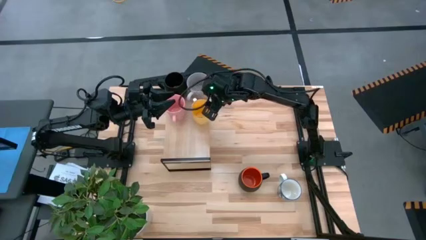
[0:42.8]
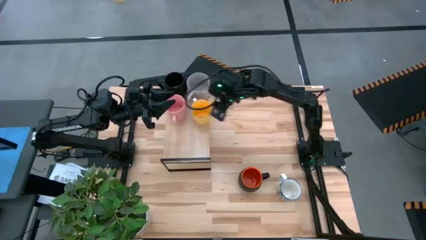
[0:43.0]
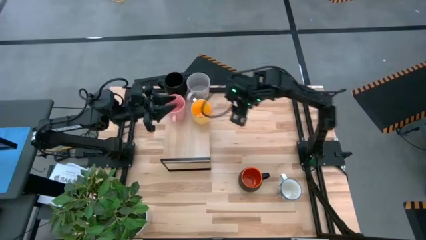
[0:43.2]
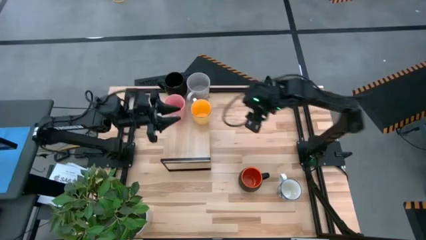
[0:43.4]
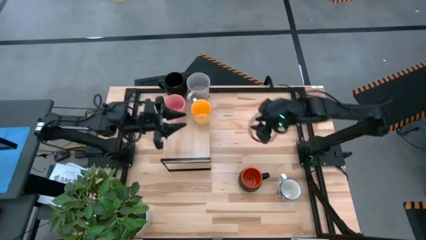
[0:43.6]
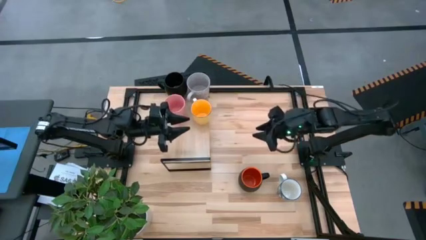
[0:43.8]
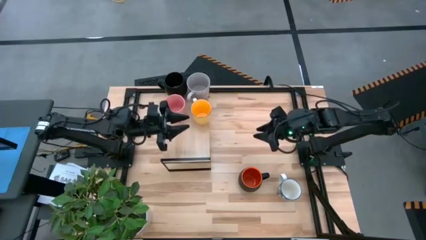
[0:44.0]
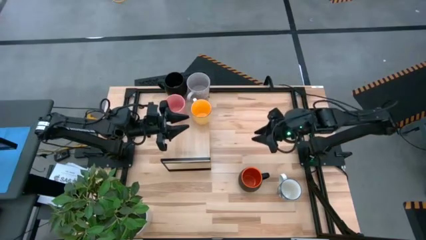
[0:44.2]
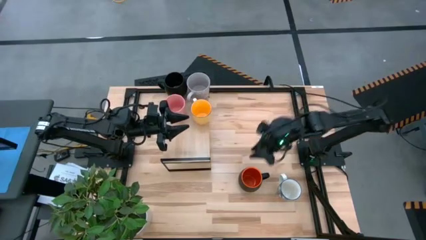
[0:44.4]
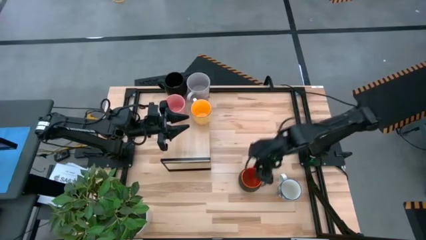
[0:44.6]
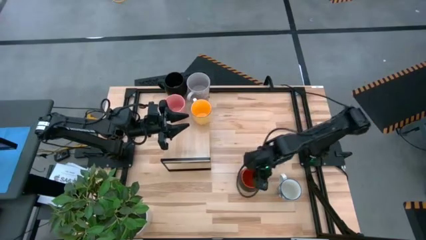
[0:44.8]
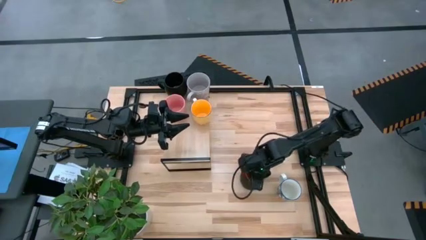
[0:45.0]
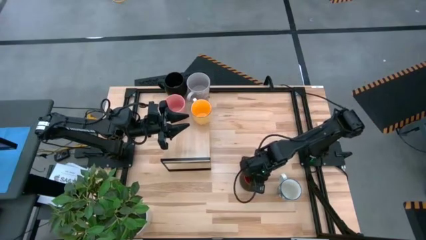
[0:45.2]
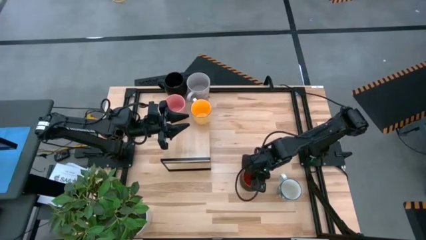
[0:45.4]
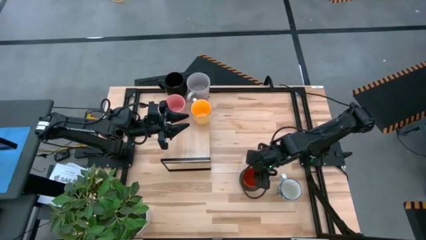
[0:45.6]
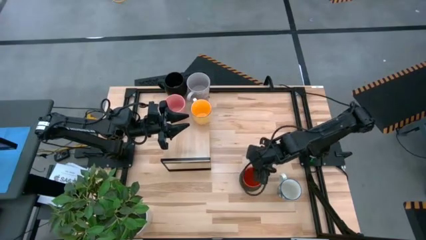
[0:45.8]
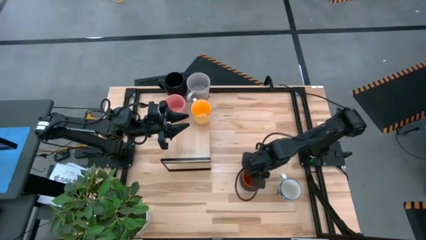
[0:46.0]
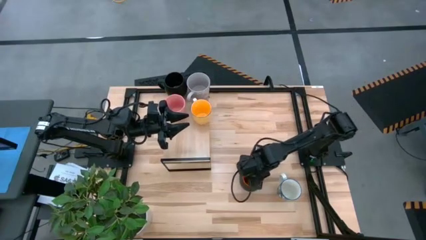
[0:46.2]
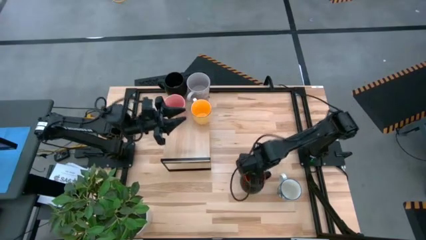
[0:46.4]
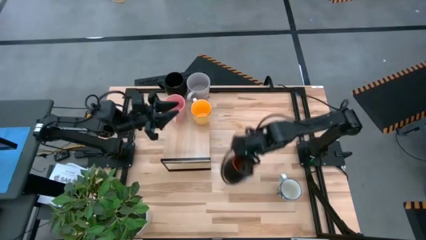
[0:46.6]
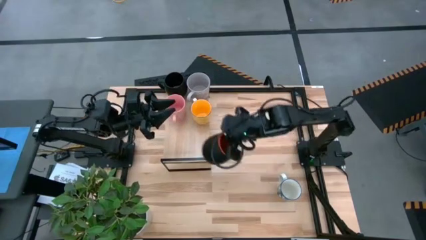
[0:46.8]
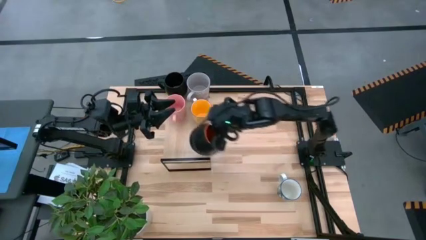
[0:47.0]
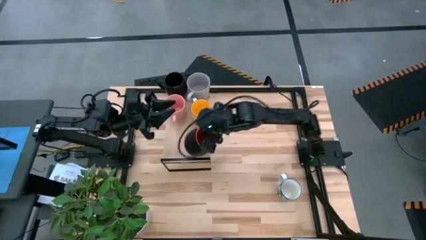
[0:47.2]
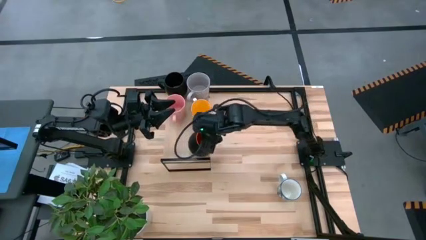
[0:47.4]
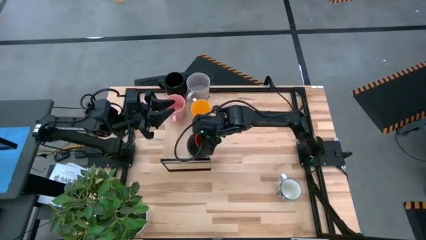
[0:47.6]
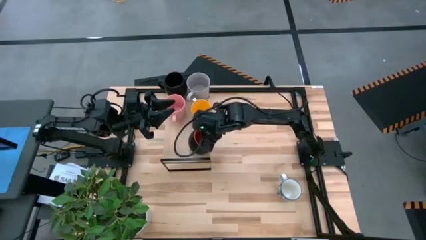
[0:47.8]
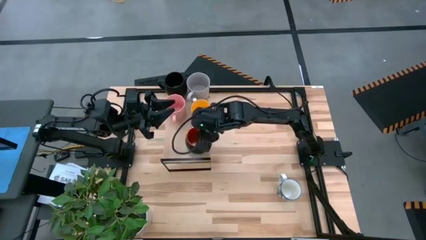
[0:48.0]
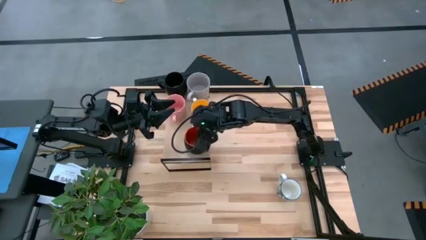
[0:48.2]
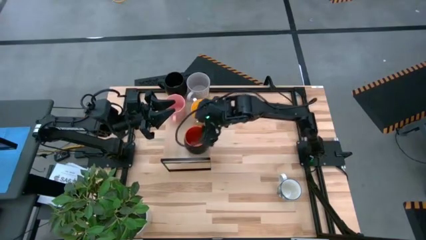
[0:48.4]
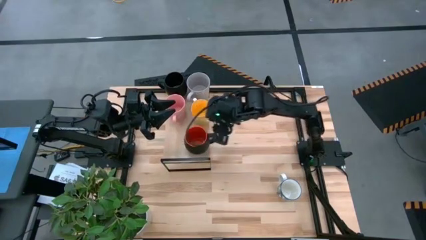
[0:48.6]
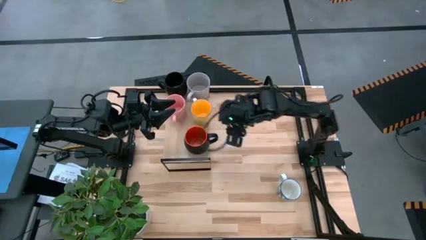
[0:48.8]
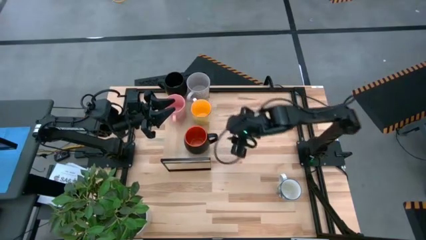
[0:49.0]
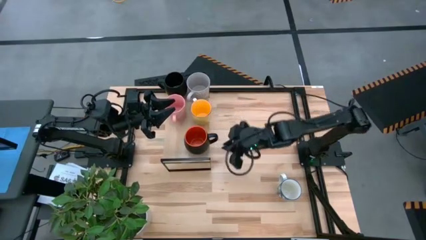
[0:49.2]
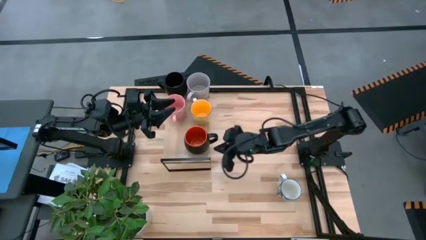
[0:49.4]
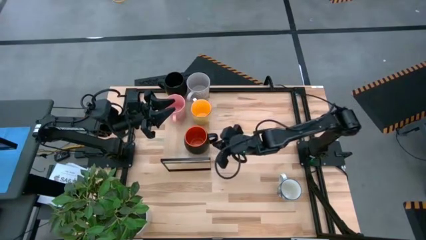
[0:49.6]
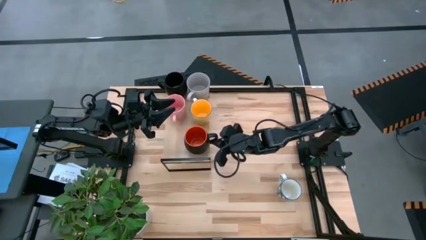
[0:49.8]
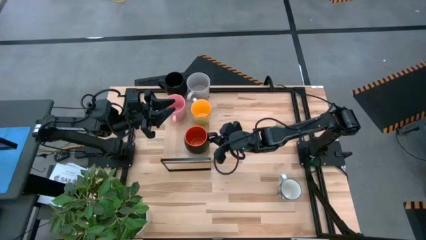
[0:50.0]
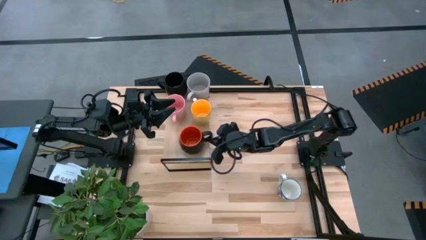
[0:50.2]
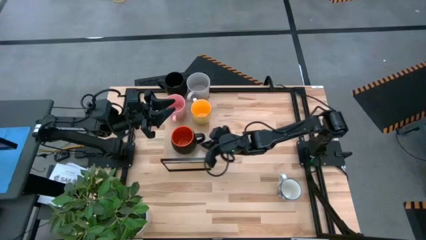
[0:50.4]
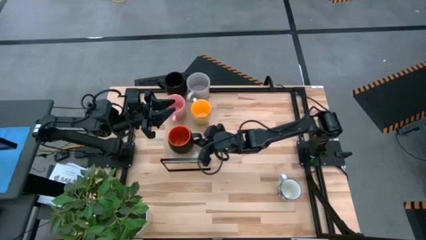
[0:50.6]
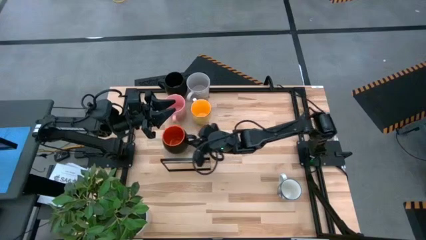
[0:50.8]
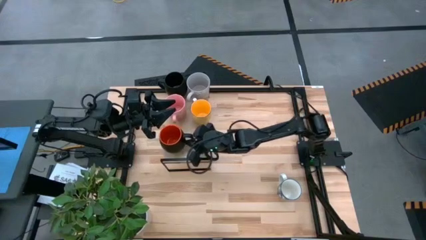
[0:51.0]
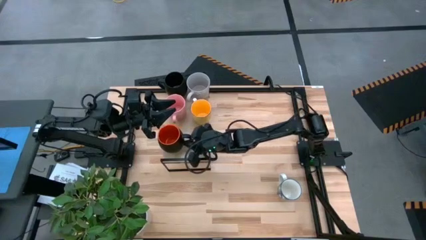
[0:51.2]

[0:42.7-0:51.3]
Task: Place coffee mugs
Put the orange mug on the shelf

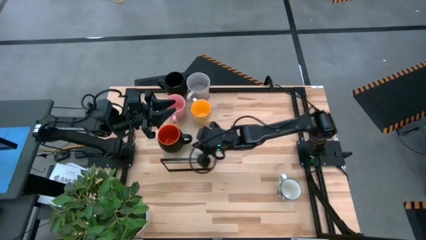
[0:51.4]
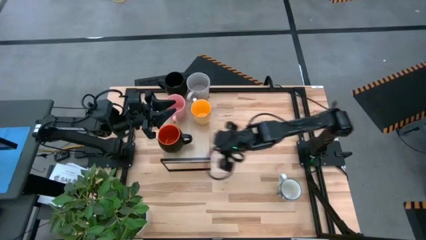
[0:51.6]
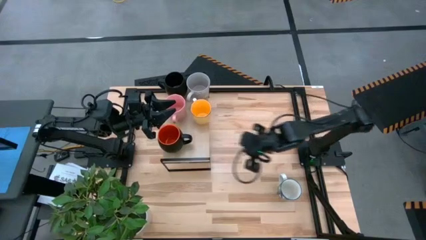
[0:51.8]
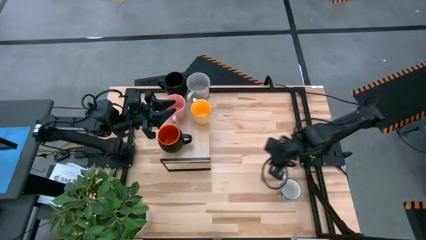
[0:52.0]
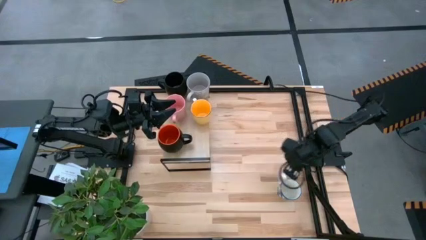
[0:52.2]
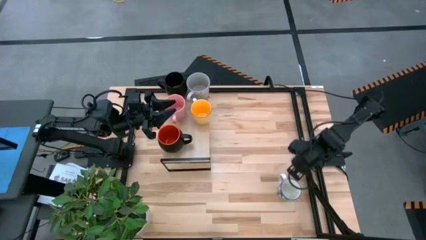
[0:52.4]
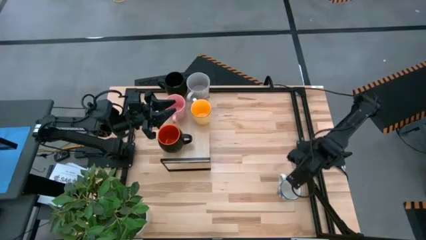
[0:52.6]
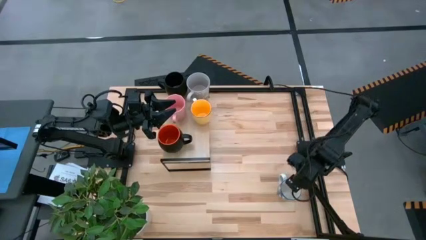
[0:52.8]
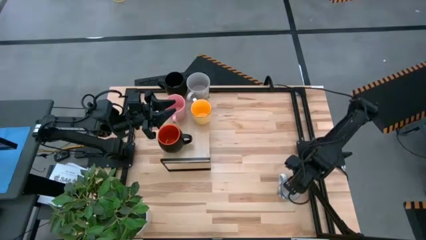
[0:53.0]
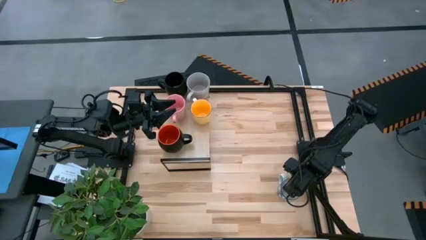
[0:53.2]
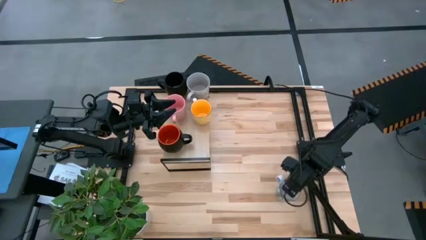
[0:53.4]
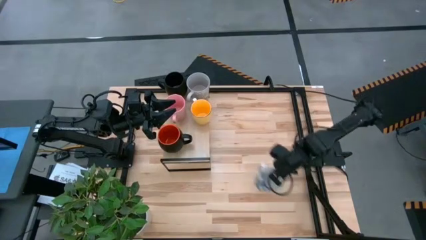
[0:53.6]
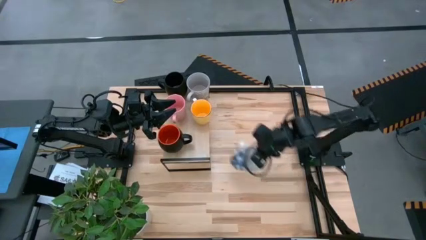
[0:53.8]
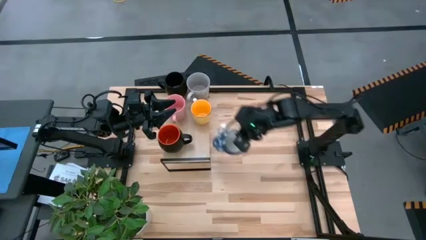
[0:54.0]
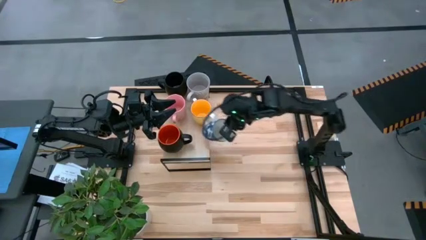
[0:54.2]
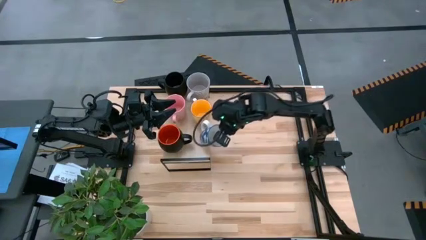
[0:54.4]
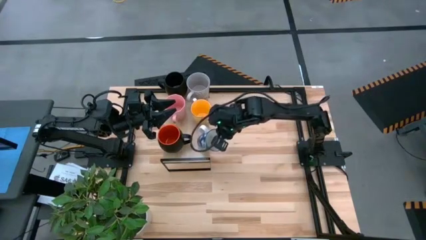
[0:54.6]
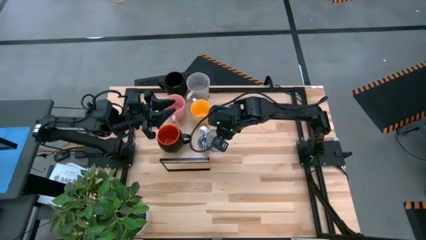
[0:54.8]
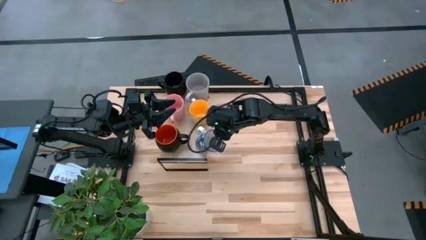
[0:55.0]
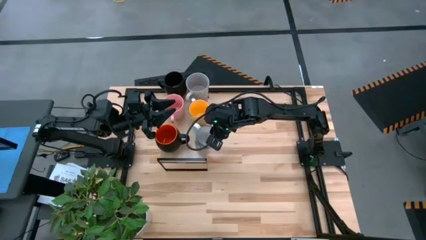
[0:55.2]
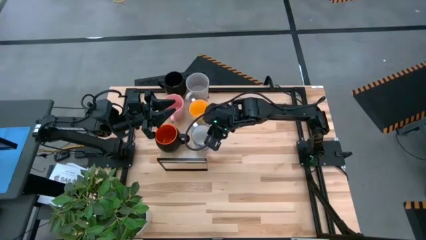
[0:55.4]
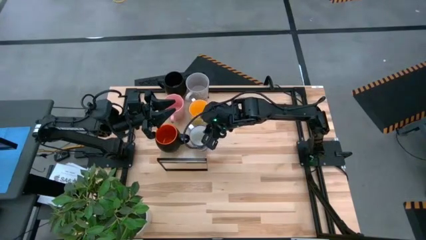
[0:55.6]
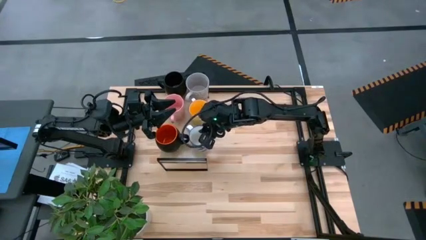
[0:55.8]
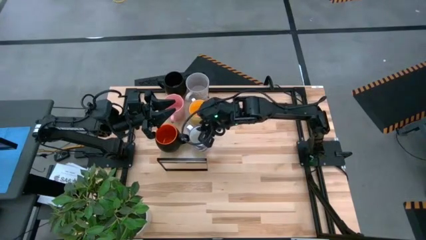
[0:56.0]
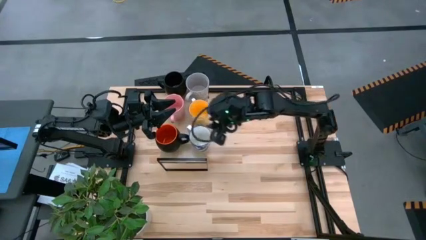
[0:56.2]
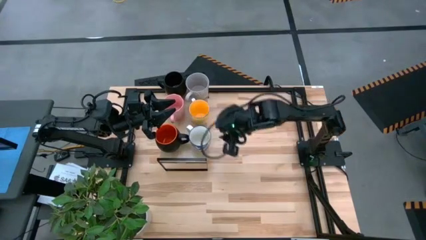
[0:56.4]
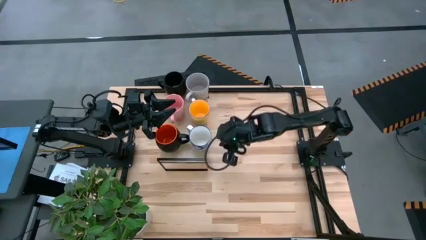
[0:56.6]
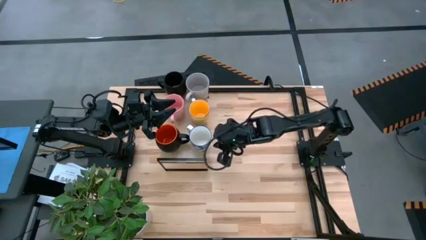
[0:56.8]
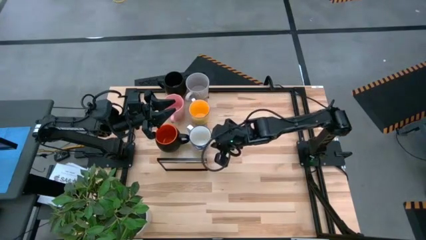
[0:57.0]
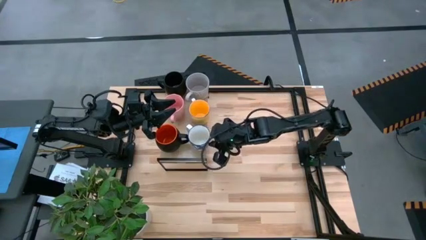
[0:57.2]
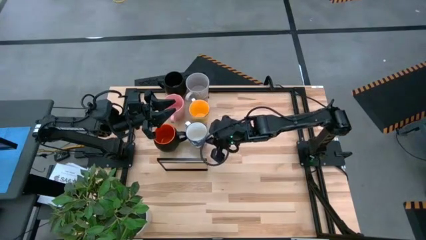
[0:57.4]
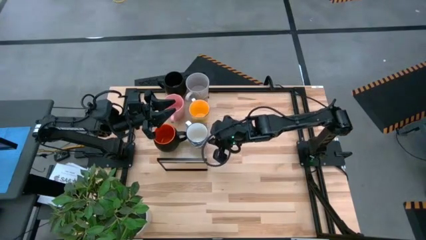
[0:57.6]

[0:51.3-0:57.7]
Put the white-blue mug on the shelf
